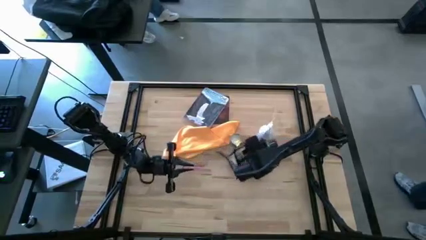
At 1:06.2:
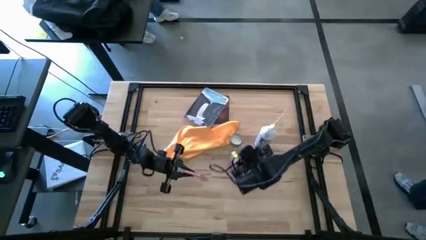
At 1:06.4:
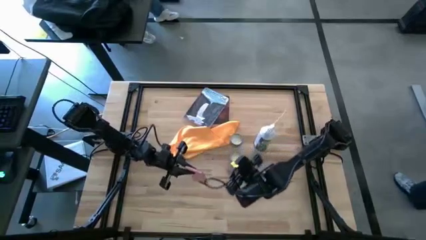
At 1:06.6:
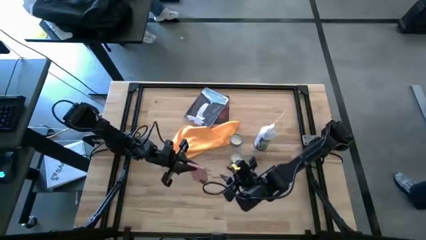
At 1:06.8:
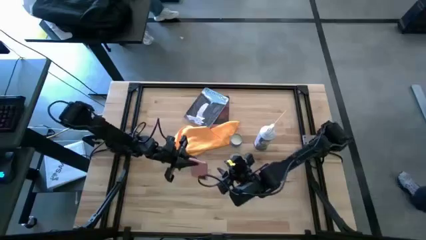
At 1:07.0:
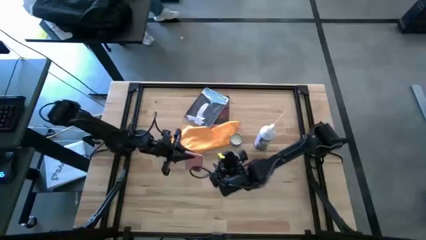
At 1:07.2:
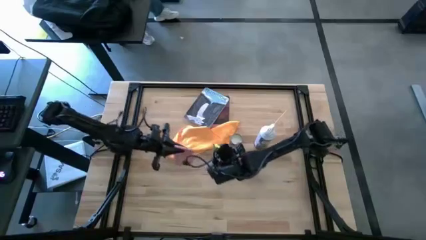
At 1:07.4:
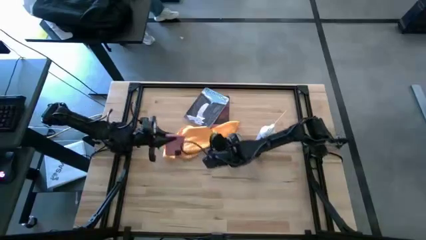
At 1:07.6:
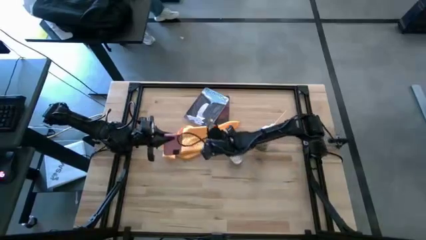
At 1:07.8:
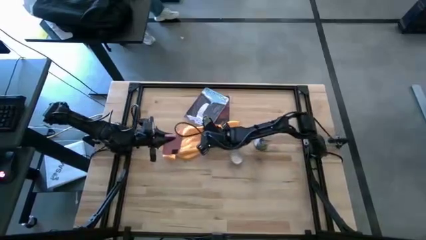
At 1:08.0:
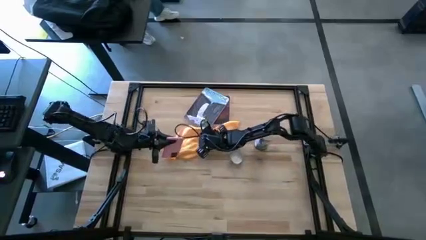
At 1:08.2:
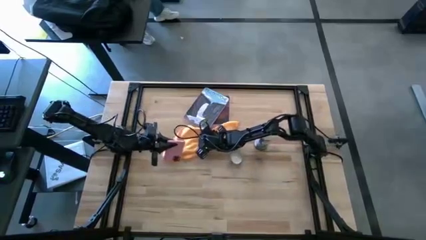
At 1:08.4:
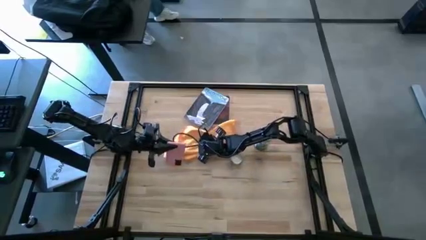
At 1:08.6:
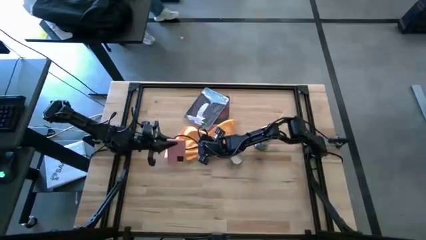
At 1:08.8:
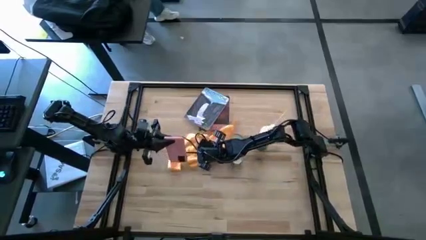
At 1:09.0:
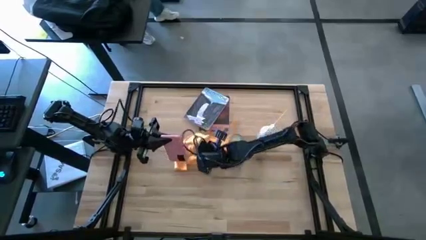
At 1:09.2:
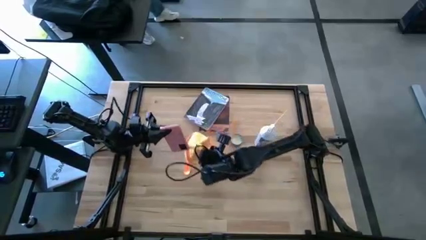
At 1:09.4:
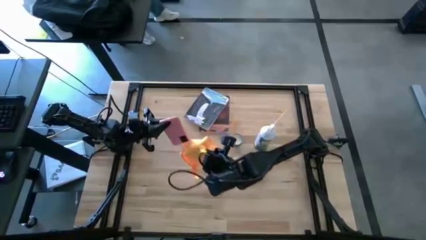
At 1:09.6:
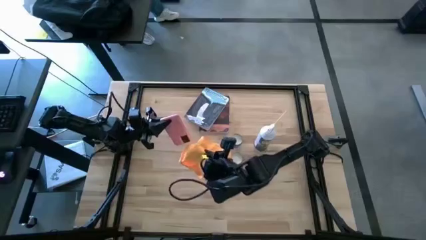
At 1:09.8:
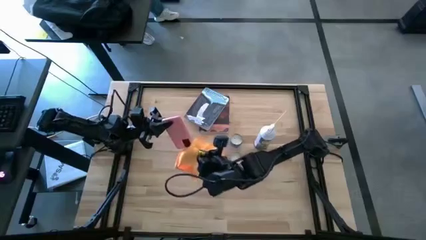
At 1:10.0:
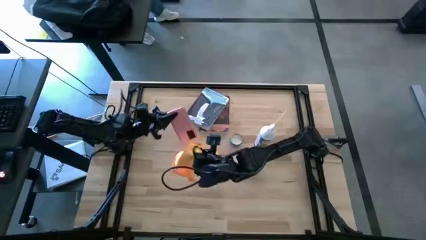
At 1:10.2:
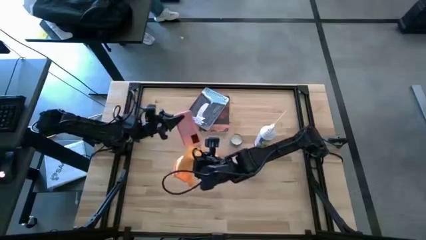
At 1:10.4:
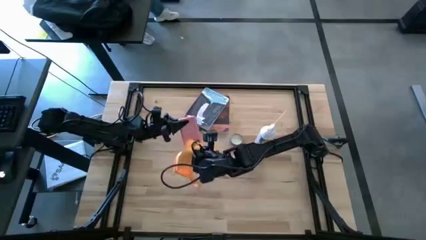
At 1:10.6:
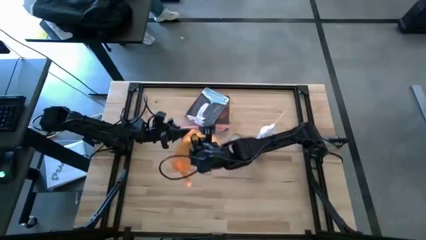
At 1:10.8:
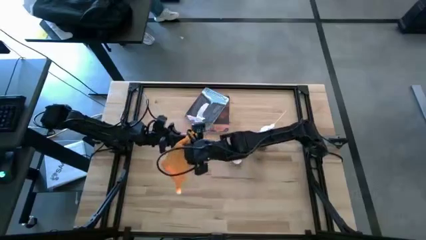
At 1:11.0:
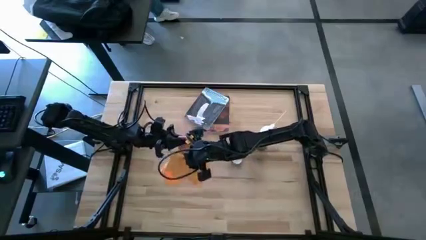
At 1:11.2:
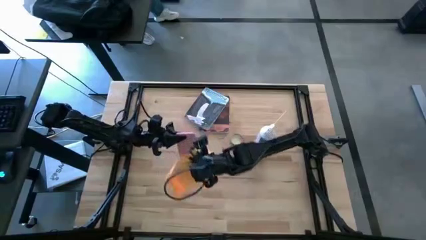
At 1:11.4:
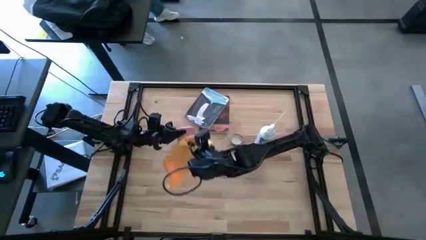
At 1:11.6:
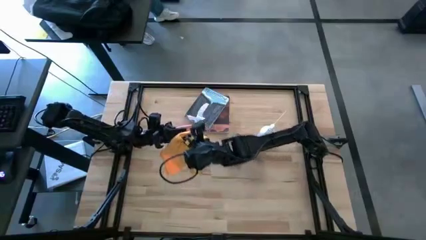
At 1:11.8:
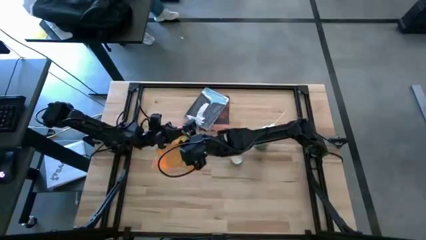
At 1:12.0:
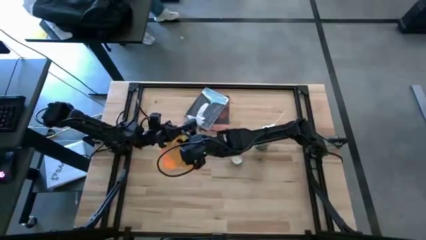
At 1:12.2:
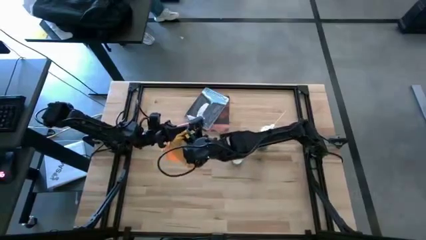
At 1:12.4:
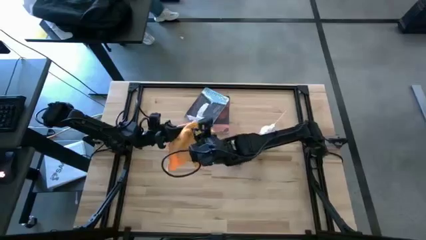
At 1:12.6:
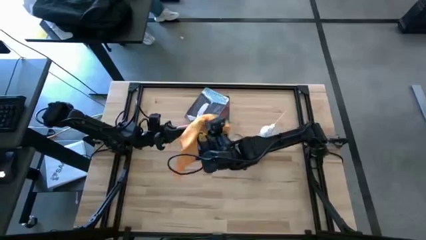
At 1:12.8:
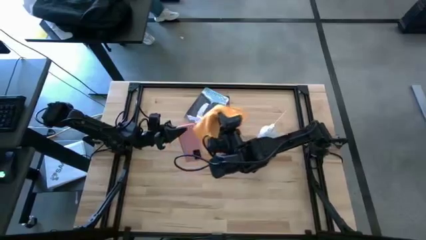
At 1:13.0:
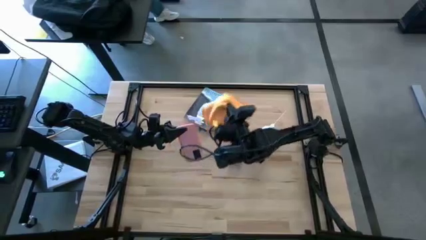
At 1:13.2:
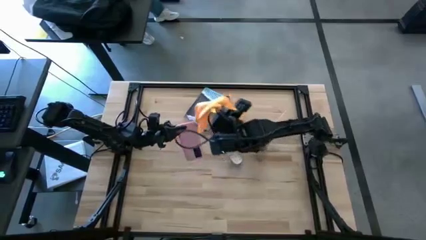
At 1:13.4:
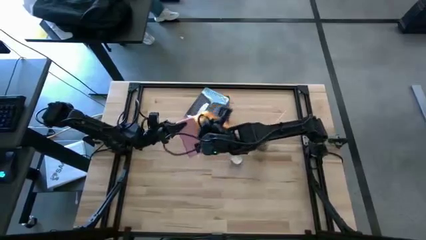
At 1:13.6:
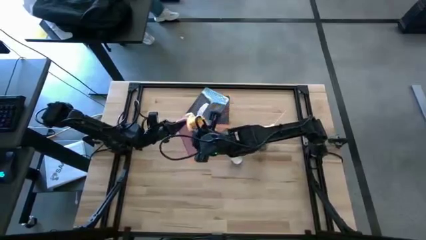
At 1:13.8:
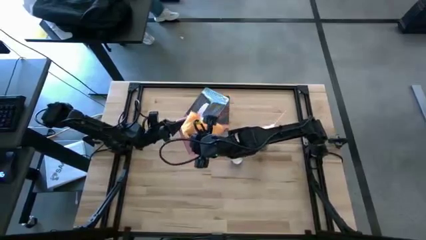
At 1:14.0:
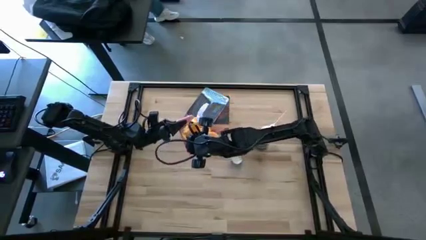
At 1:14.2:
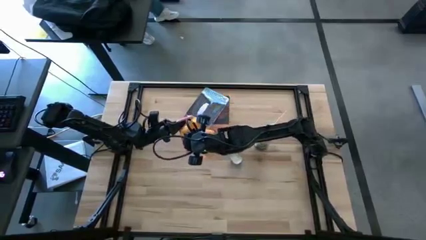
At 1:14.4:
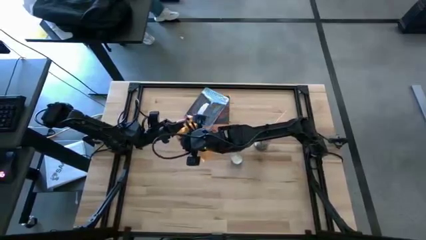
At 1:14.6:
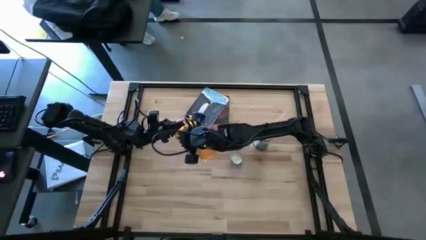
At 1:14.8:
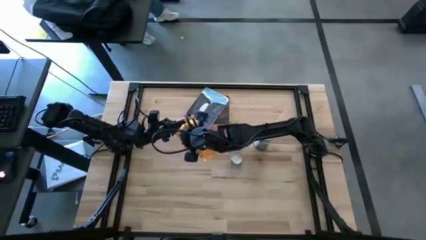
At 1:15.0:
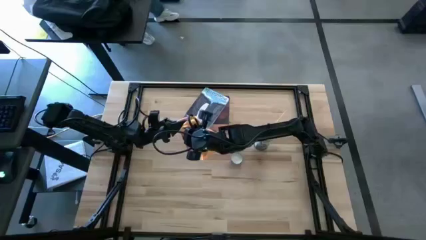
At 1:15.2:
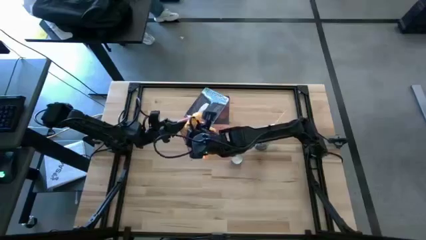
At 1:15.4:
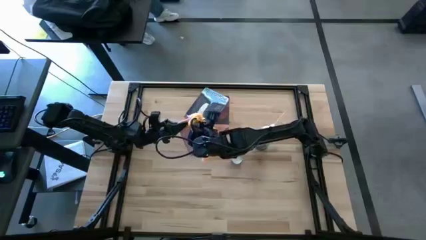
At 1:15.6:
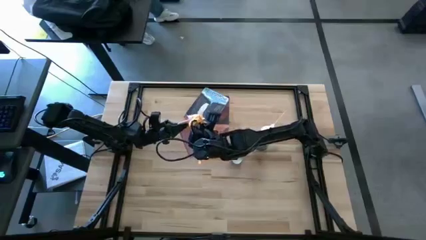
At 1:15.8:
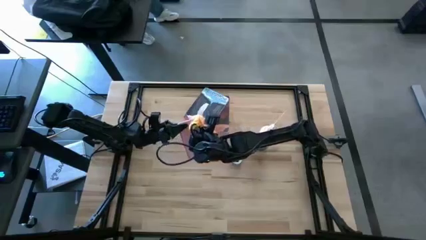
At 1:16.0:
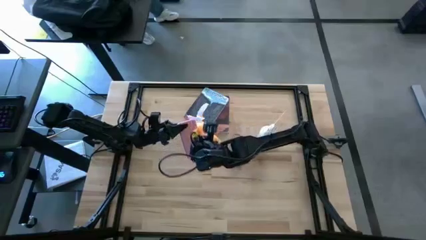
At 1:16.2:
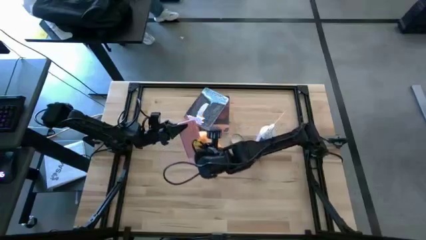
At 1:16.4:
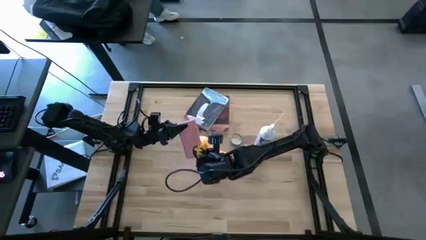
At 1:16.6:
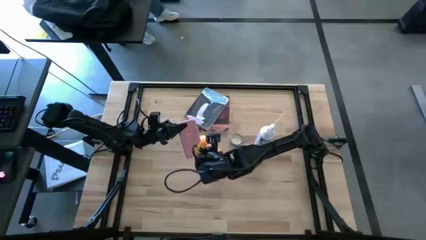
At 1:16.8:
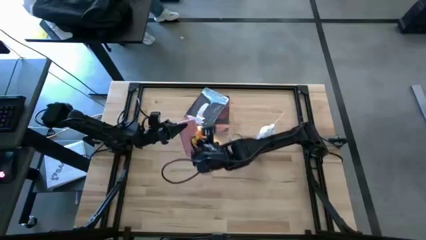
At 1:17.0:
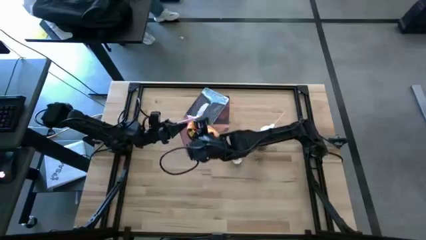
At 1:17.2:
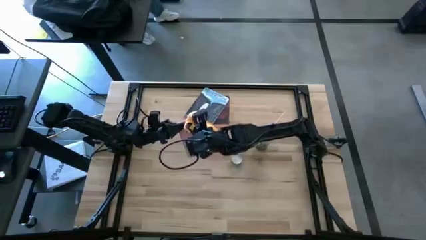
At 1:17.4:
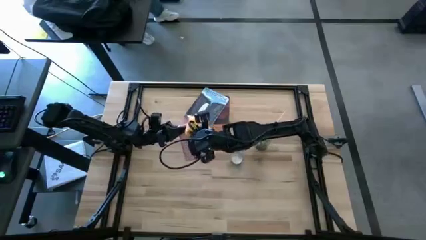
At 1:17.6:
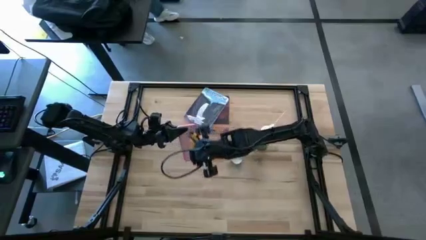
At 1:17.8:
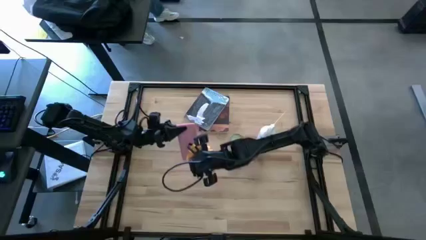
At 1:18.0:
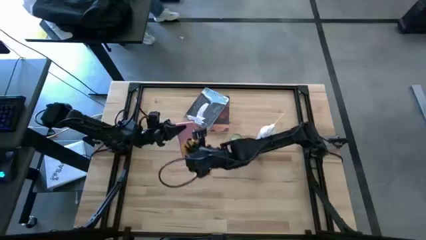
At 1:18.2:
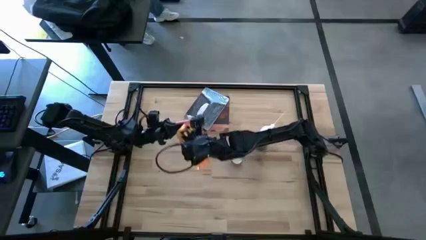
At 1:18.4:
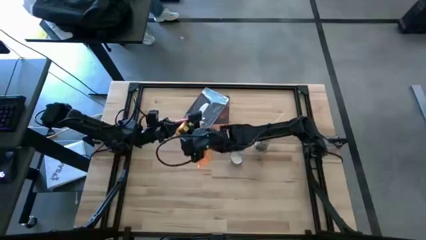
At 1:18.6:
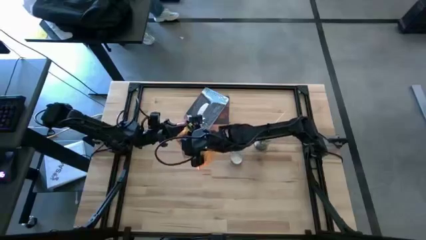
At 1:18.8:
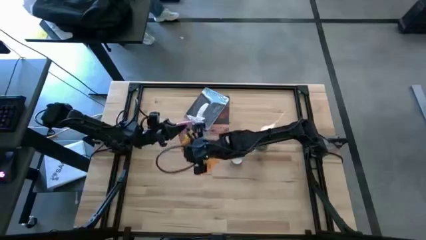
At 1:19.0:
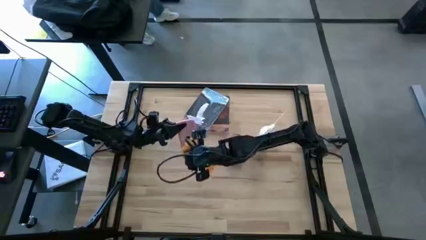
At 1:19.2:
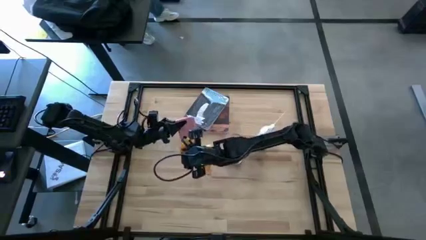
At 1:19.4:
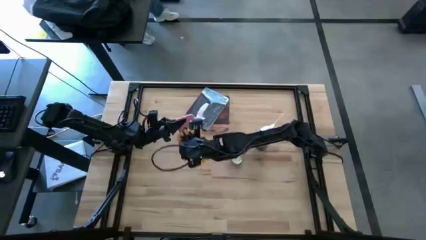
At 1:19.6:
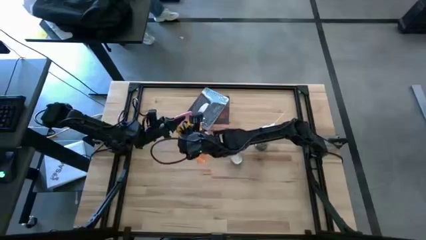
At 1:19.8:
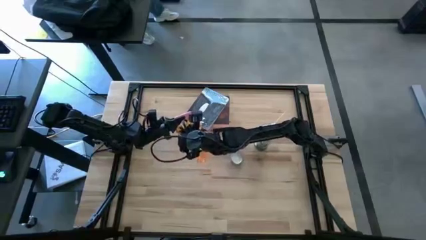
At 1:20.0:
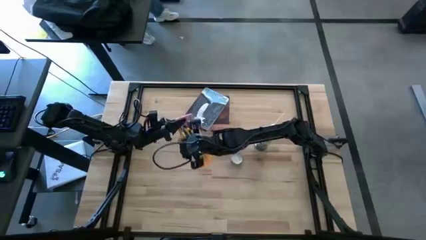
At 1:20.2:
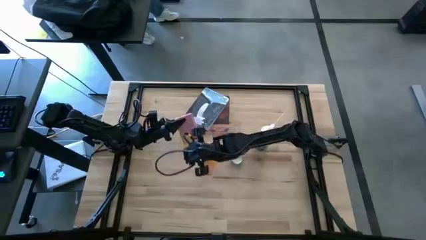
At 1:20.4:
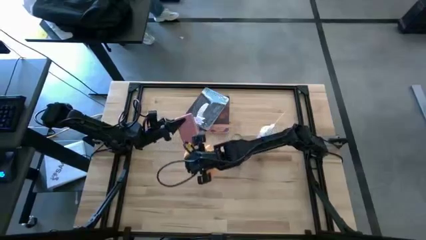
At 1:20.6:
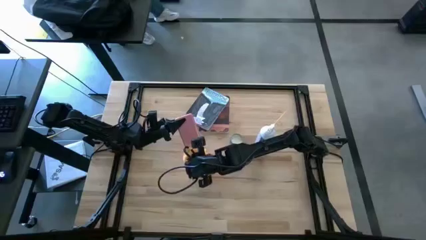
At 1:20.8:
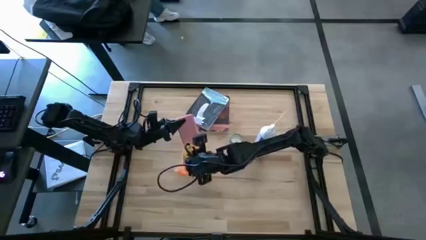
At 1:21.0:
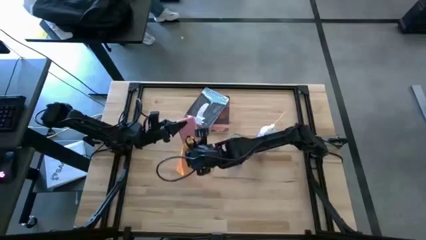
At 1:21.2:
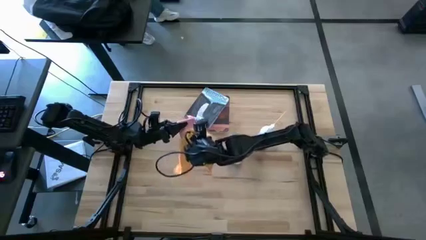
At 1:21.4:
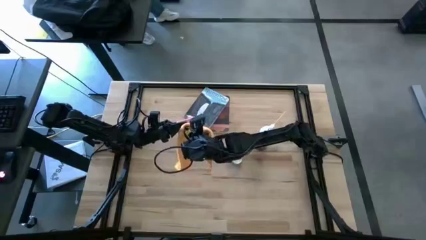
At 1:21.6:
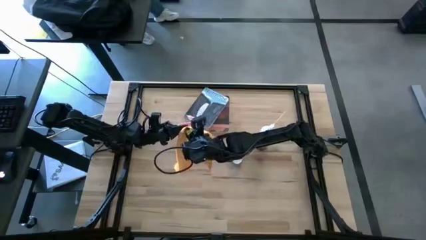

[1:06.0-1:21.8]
Task: Apply microfiber cloth
Wipe the pink phone with the orange microfiber cloth
